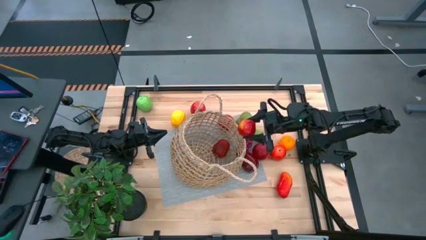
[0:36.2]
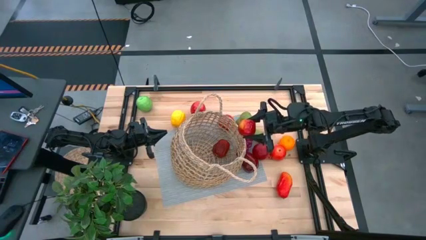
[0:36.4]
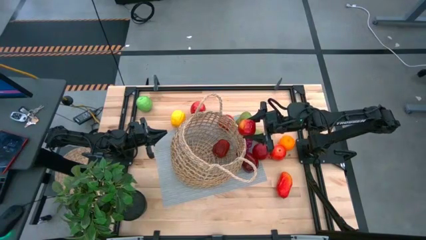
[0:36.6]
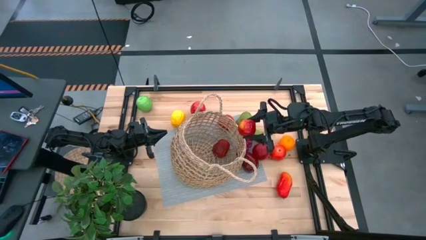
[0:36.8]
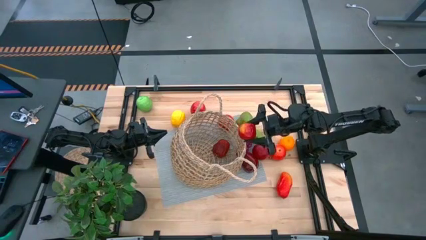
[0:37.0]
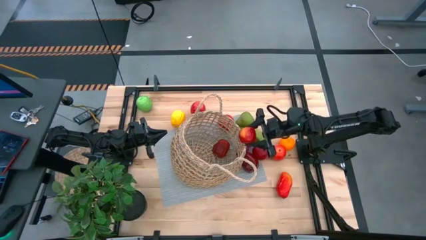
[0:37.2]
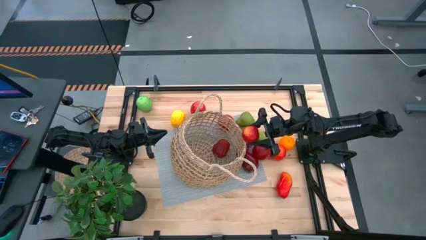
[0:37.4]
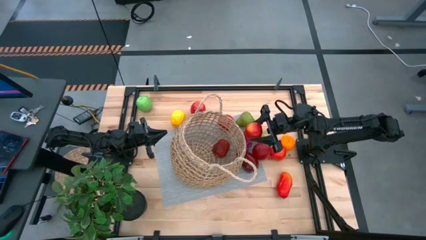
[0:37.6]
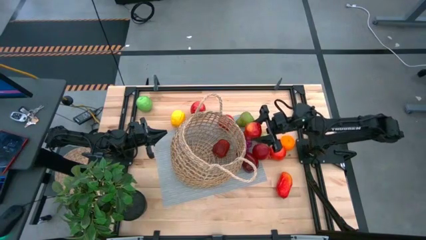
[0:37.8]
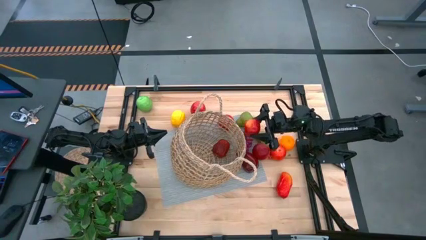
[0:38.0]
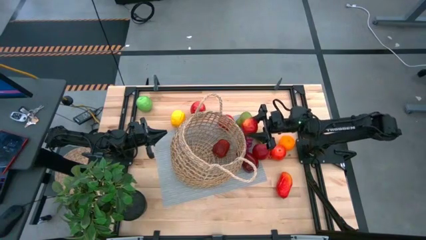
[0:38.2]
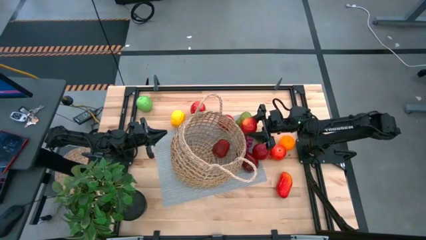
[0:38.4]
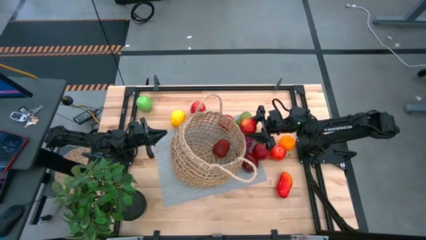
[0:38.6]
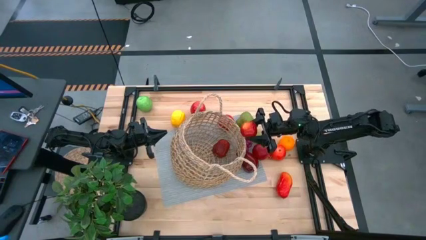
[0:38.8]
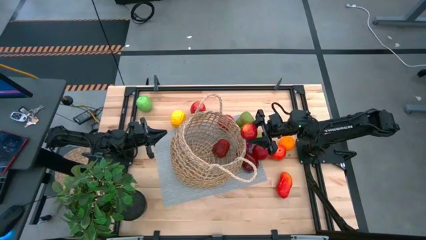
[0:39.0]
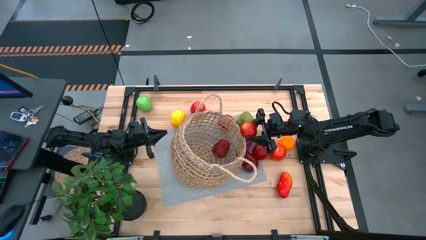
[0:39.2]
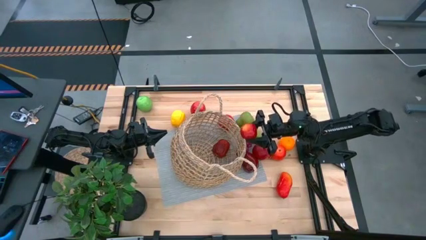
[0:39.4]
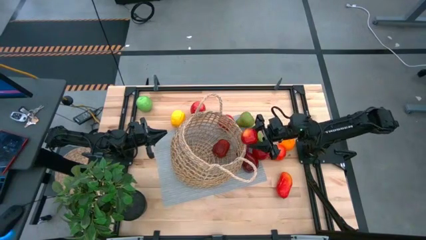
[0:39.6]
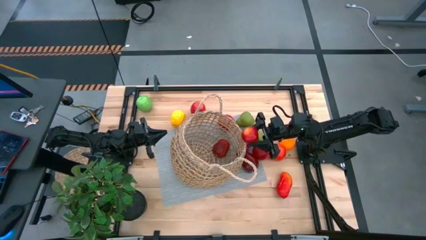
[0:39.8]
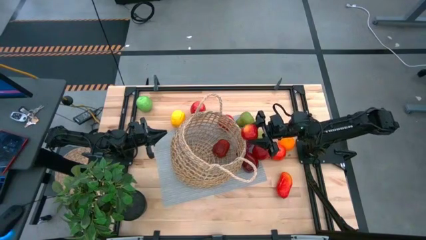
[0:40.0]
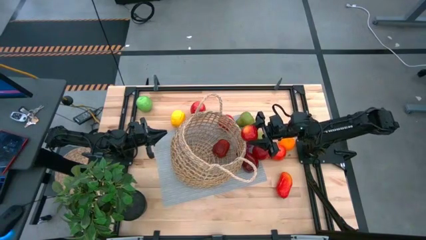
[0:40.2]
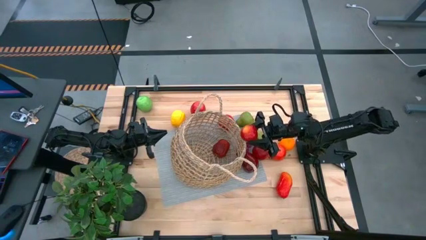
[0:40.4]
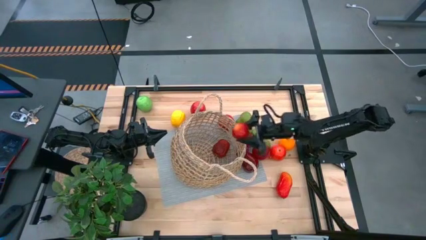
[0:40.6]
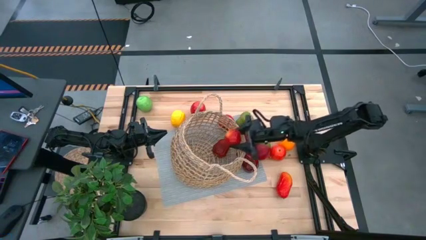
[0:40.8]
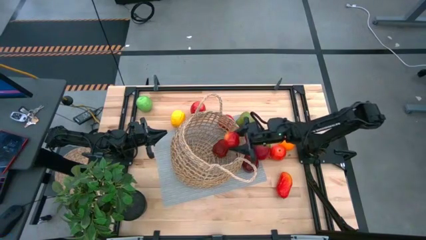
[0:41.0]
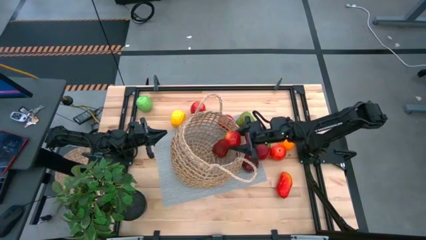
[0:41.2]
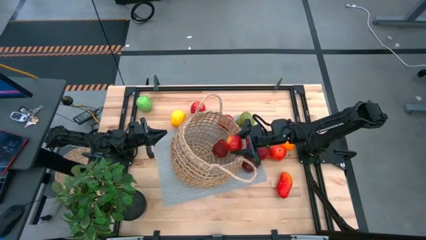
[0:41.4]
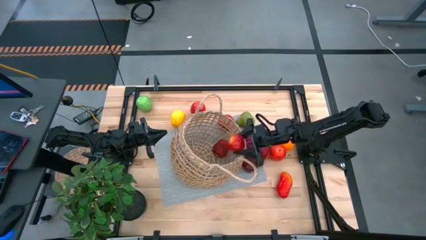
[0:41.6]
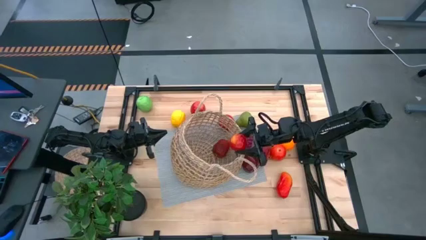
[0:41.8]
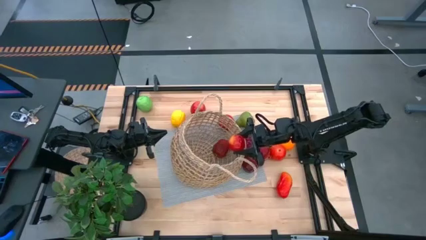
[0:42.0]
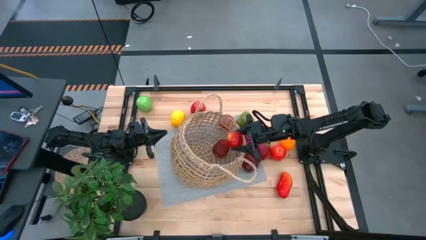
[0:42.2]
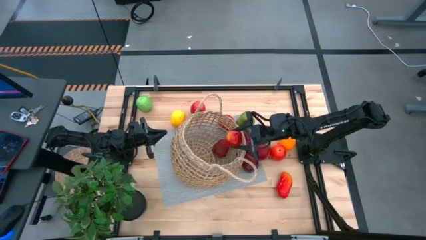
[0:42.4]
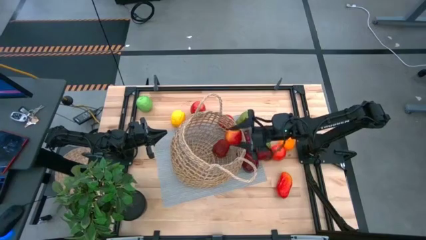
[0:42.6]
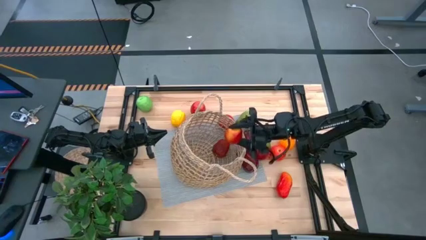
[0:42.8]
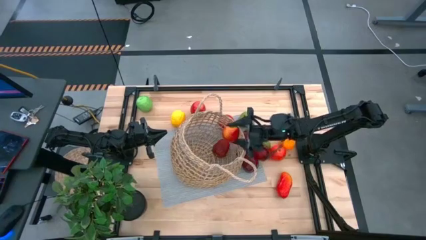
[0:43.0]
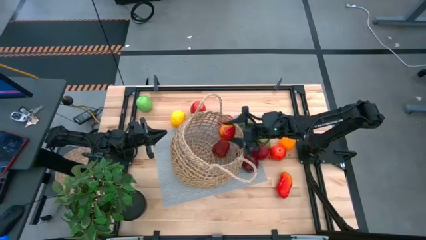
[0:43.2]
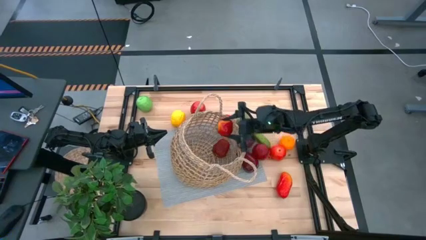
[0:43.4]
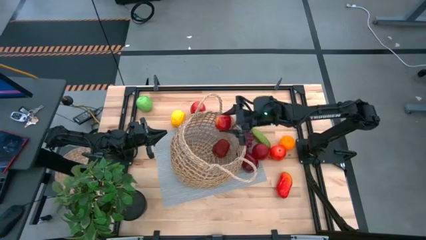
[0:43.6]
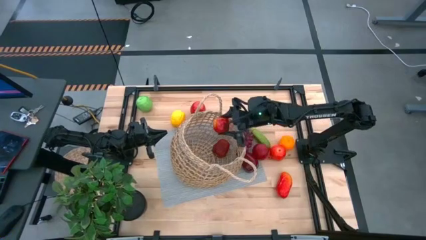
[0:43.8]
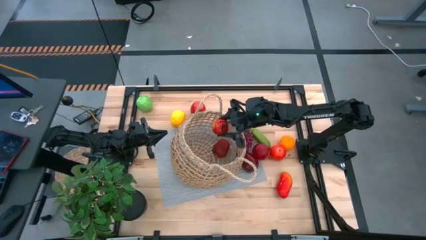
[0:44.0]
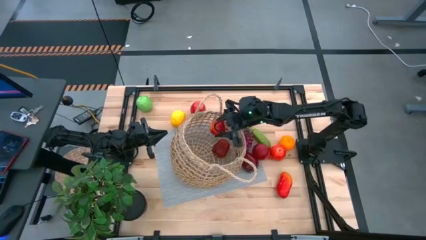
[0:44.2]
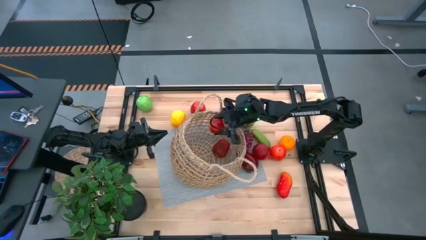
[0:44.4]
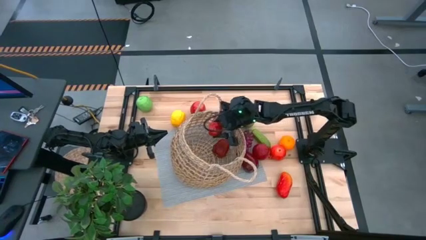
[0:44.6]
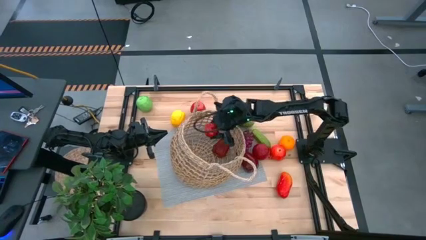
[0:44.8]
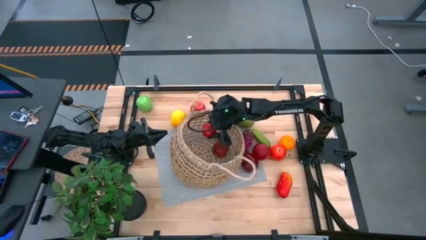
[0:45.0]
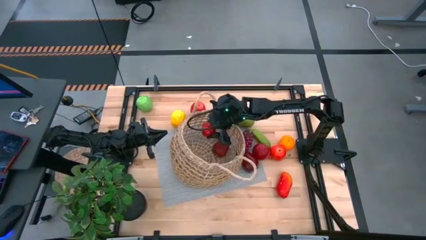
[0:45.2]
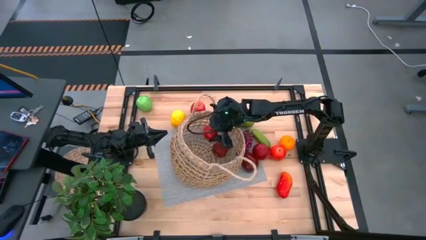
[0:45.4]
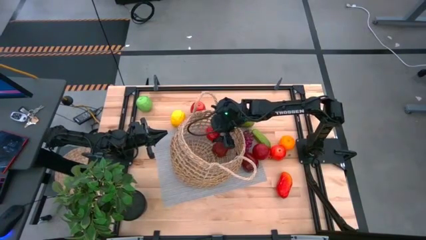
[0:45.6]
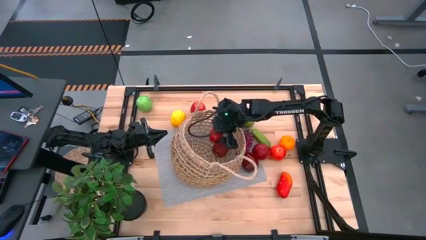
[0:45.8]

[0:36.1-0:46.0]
Task: Build produce basket
Put the peach into the basket

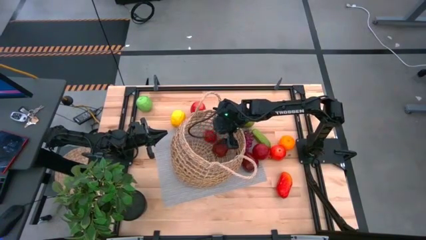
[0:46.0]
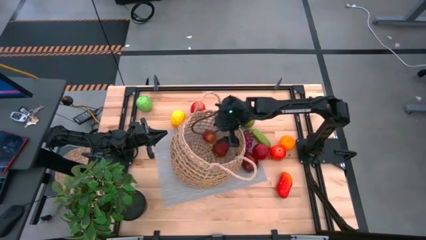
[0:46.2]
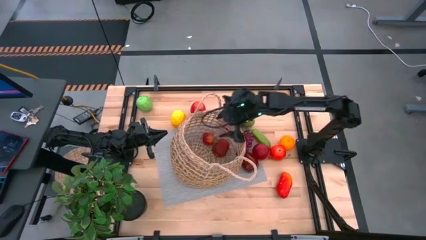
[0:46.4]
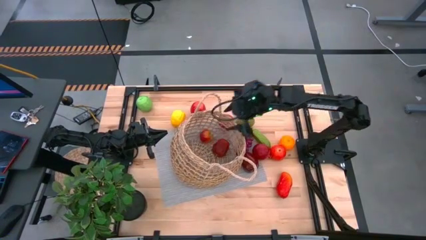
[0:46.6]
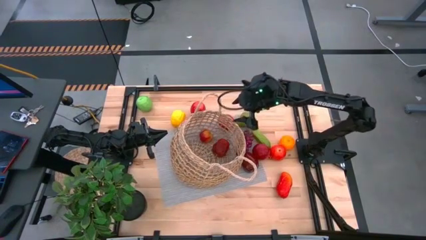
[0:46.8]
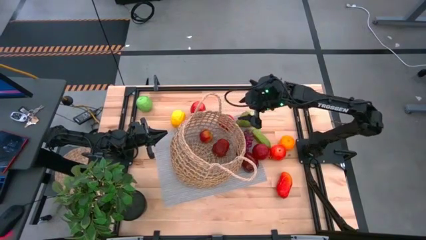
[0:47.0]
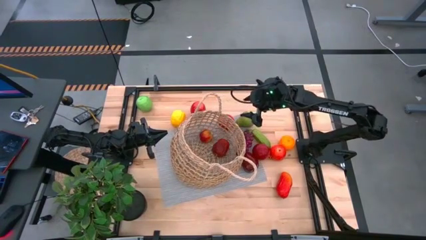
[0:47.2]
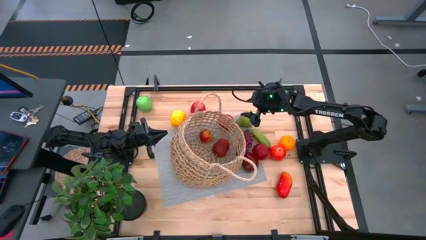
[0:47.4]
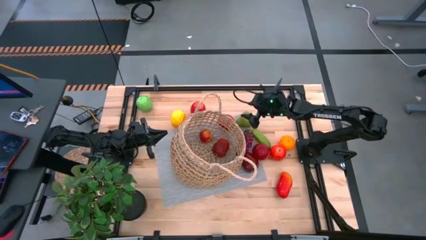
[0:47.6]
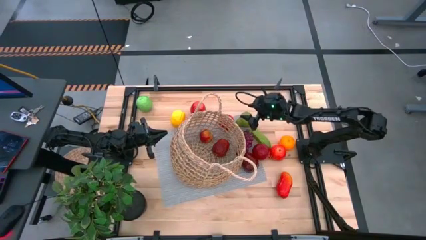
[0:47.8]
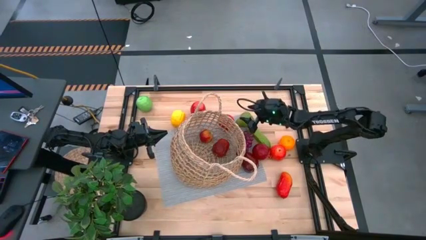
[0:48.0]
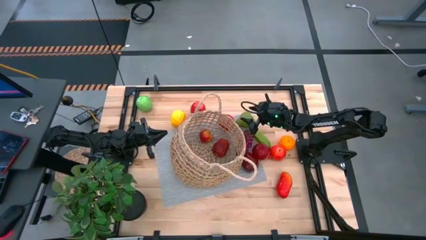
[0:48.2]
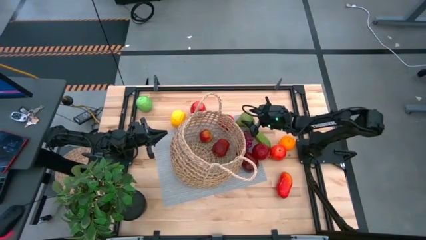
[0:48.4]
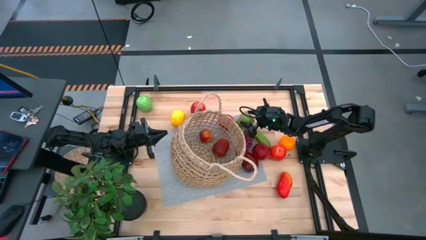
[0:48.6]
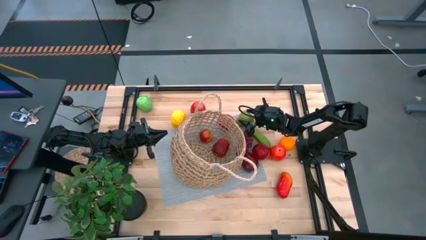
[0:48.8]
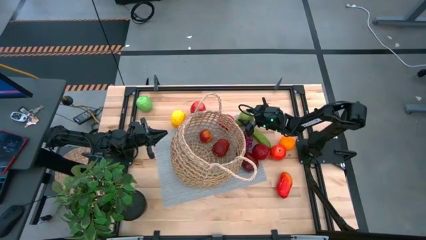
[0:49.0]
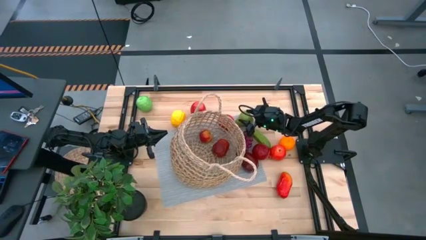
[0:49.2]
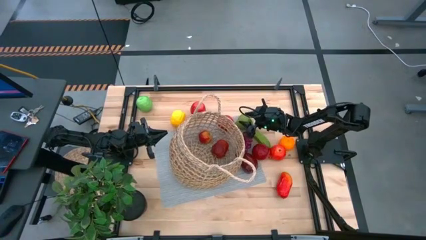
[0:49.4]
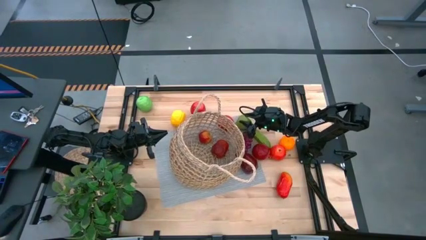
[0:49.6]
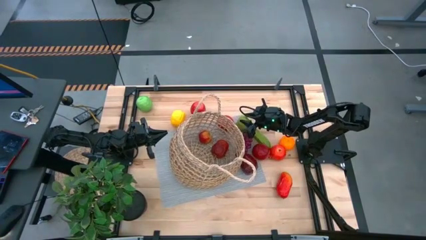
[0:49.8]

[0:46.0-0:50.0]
Put the pear into the basket

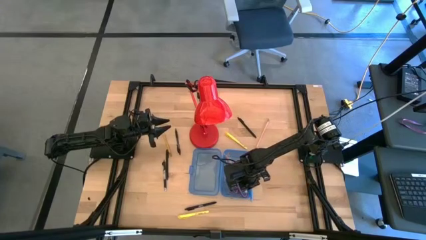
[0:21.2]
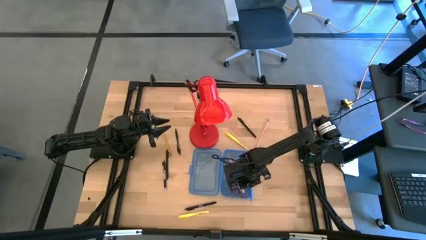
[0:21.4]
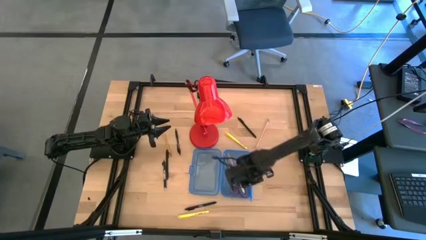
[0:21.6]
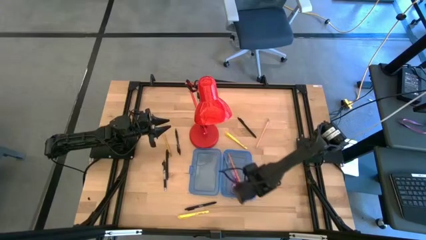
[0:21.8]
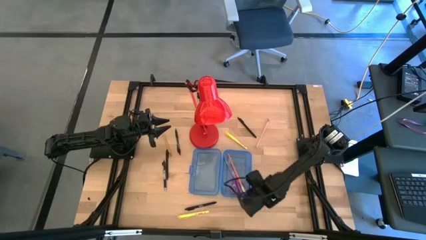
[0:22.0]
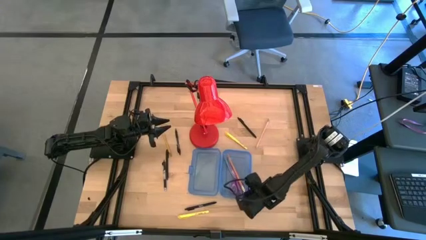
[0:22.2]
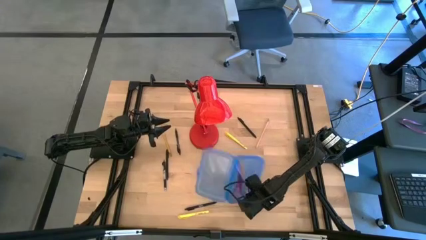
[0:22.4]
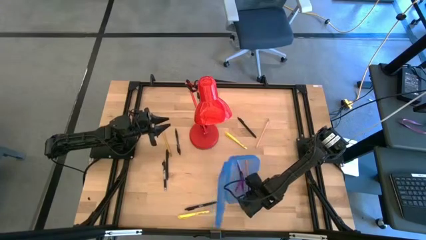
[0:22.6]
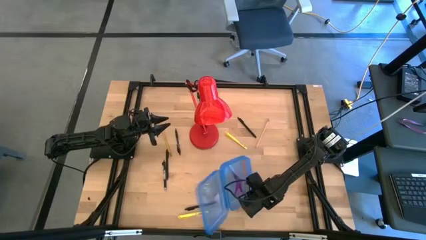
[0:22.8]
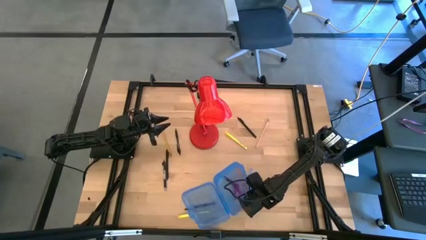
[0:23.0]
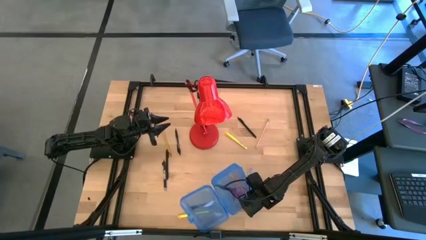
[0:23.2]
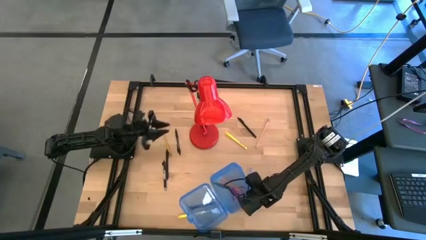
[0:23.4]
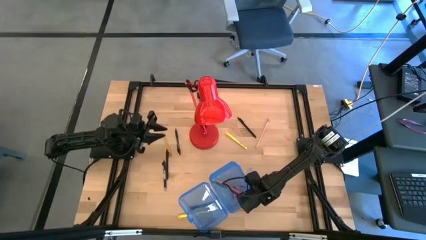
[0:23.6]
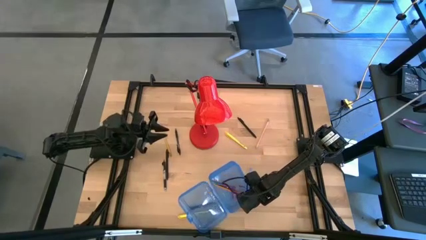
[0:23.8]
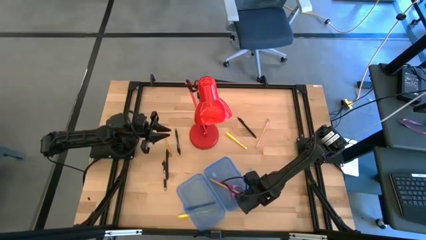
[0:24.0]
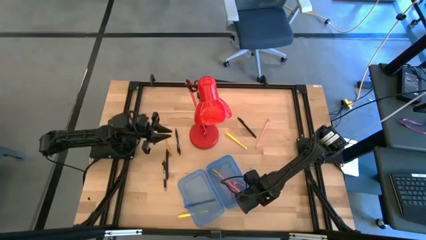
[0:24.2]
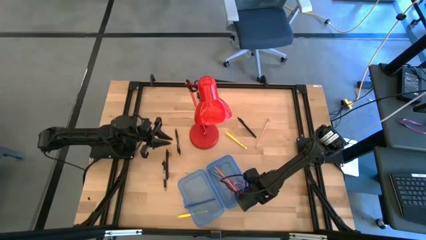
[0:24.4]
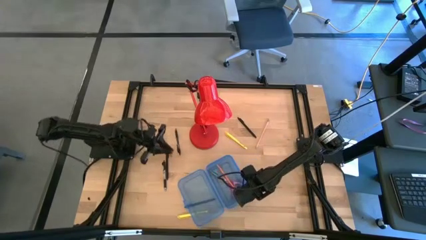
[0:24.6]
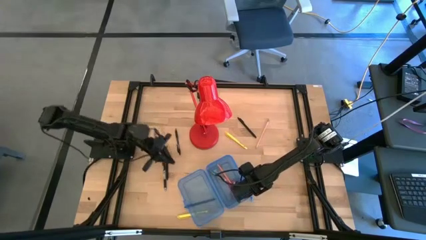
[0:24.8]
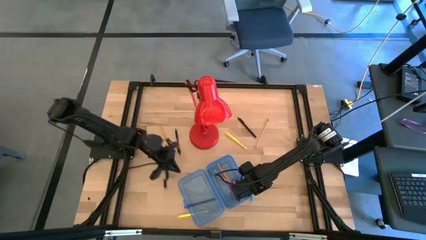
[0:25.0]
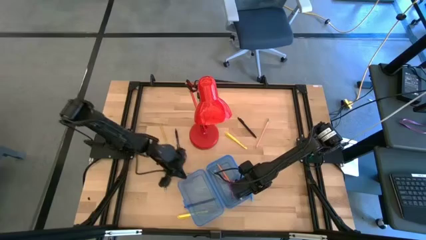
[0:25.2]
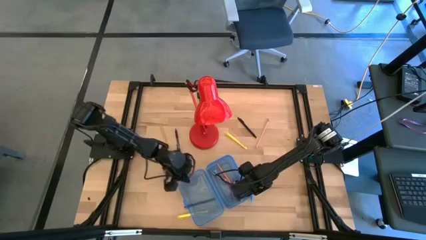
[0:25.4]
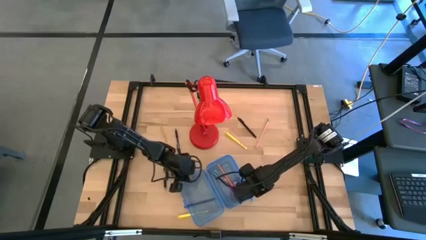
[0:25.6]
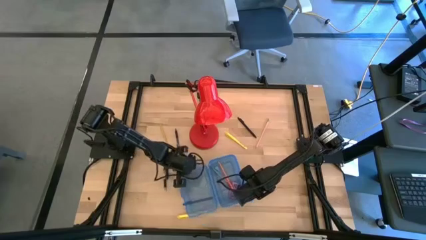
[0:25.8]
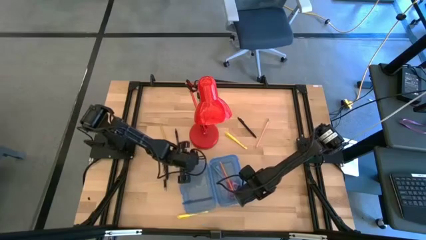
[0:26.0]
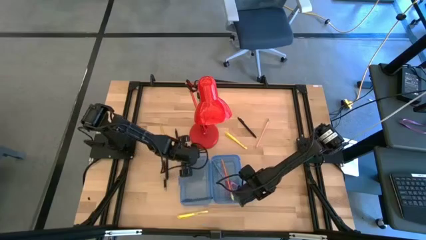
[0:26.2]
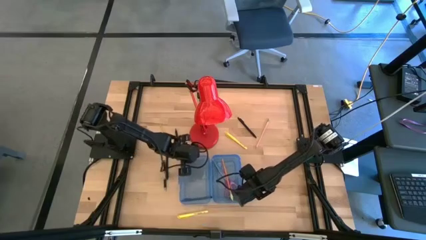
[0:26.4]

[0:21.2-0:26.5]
Task: Pick & place school supplies into a supply box
Adjust the blue supply box
